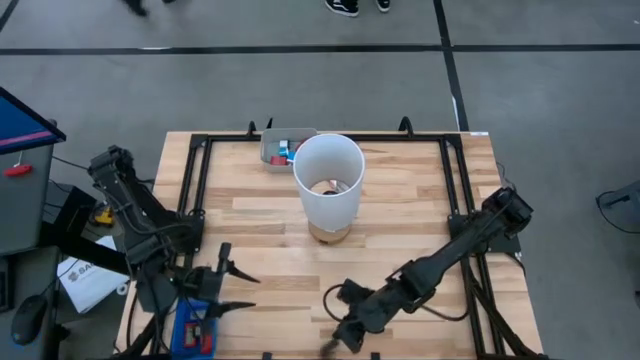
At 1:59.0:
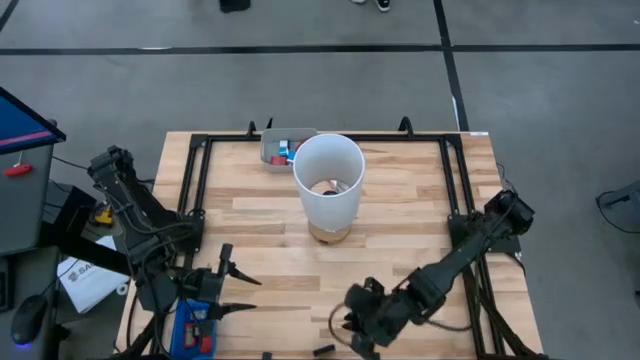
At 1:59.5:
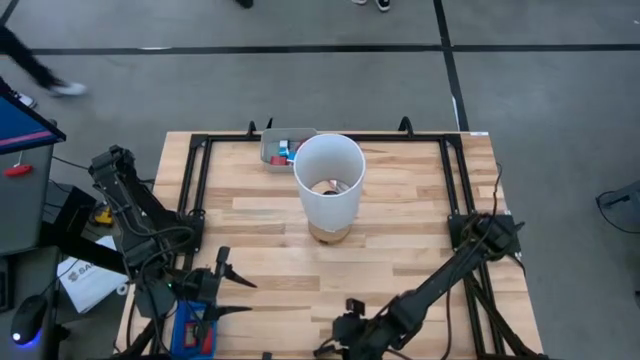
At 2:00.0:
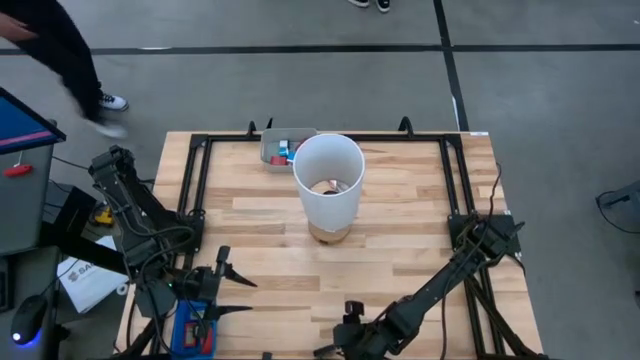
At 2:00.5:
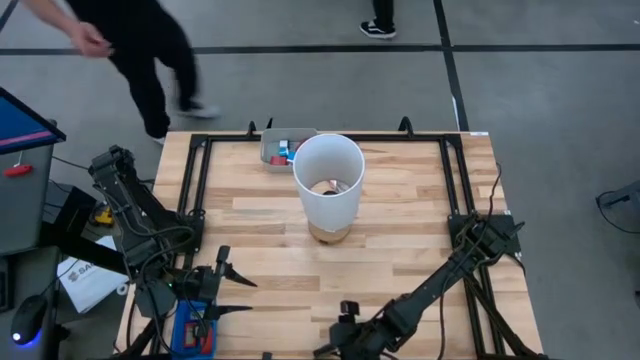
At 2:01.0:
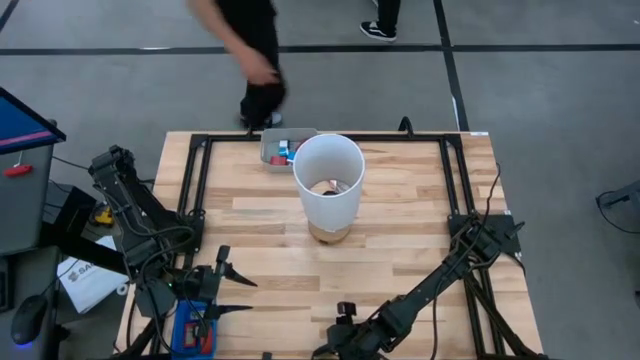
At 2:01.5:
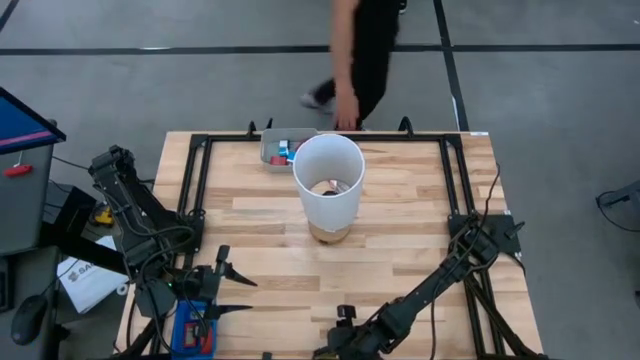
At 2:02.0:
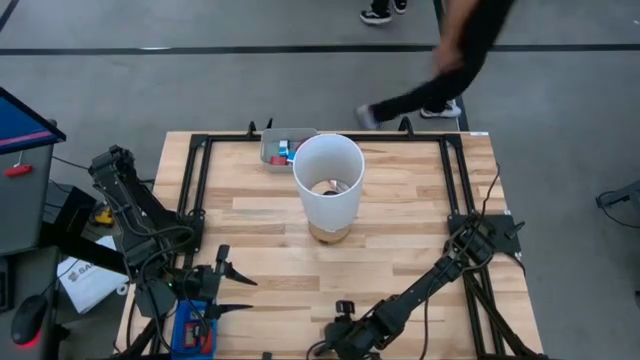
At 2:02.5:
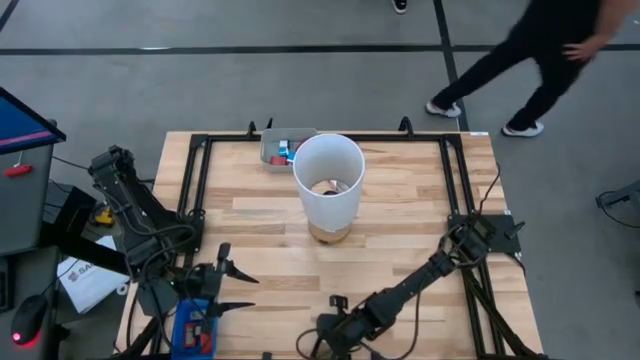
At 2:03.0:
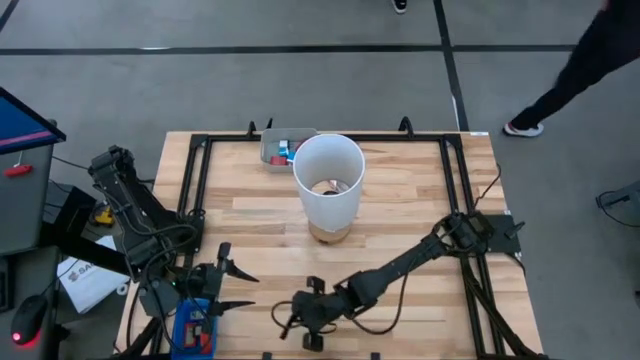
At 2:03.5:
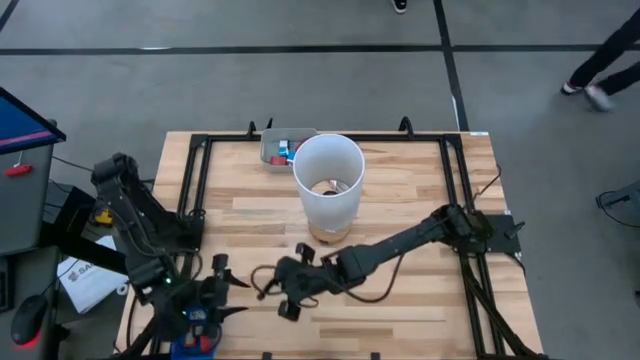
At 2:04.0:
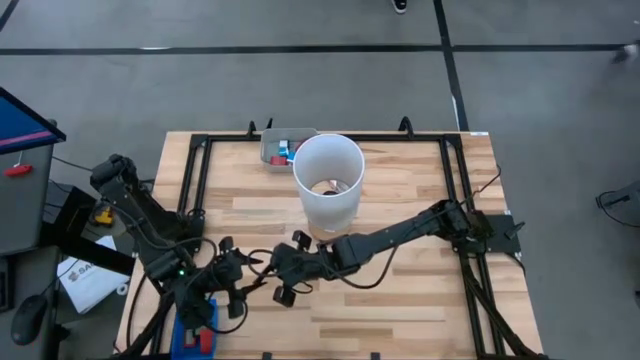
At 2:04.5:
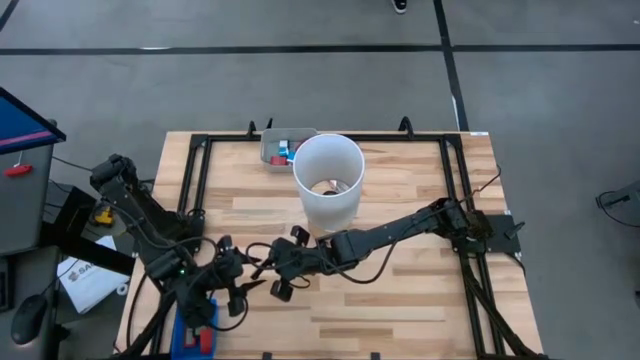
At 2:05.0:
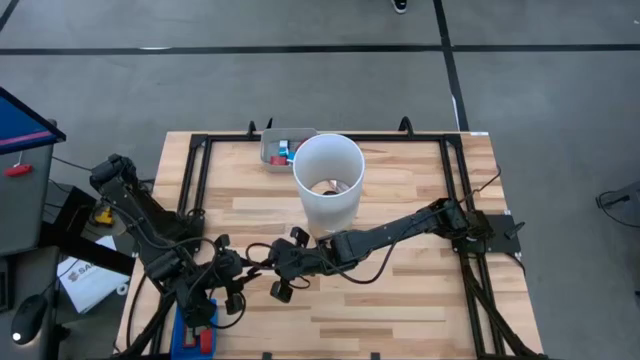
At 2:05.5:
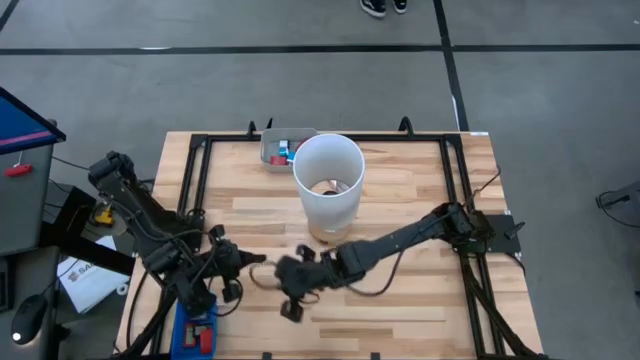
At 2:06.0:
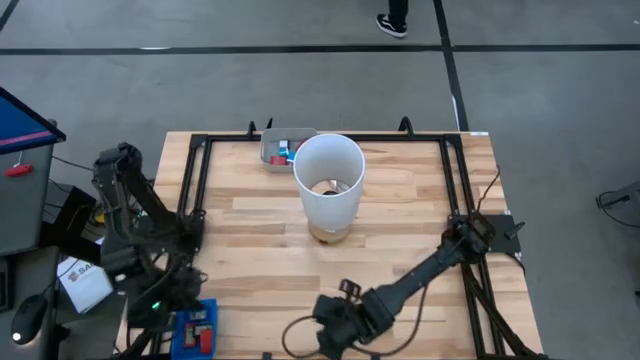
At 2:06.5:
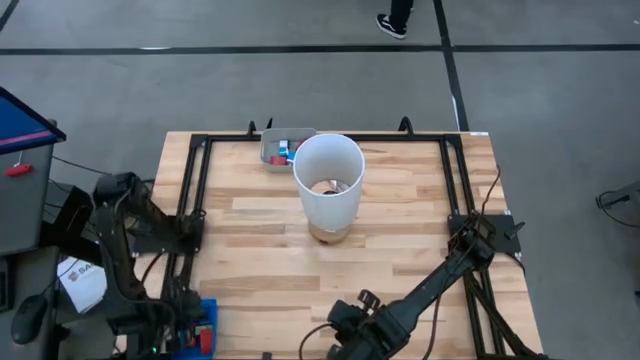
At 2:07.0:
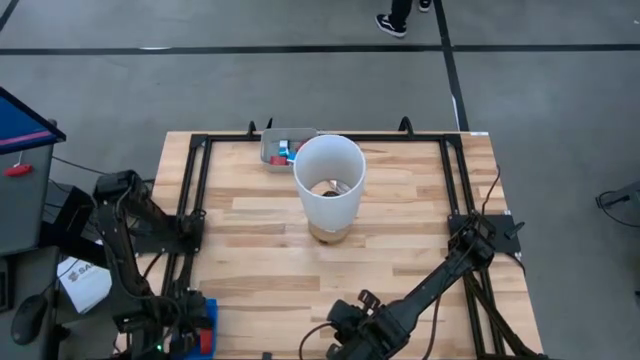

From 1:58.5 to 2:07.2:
Task: Pick & Place Office items
Put the black digital timer into the blue bin

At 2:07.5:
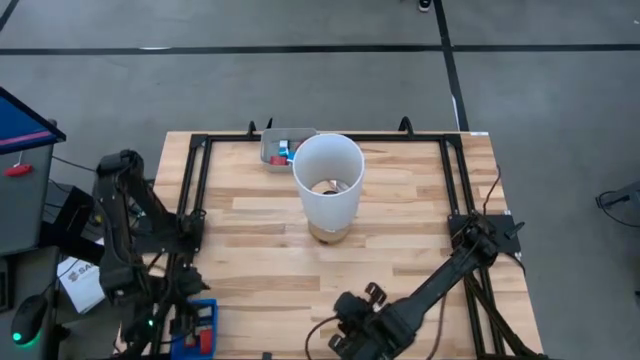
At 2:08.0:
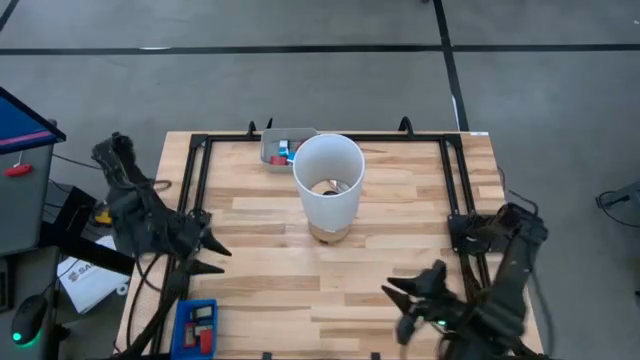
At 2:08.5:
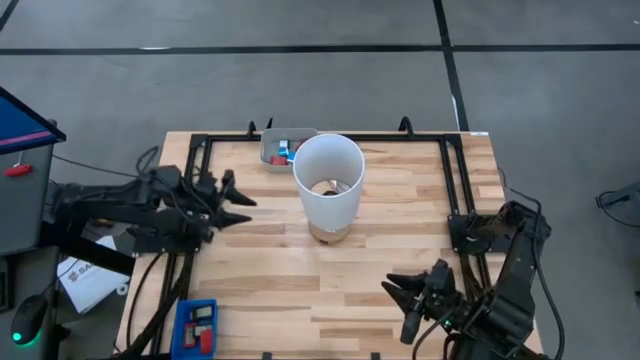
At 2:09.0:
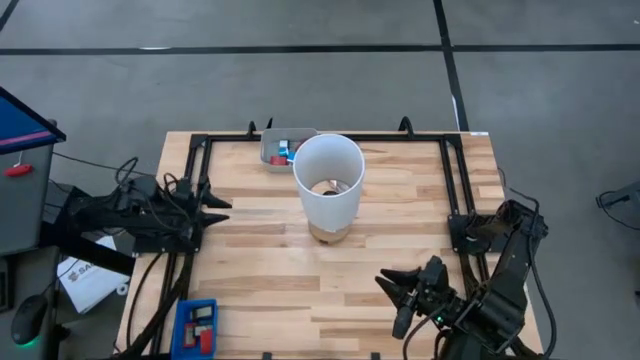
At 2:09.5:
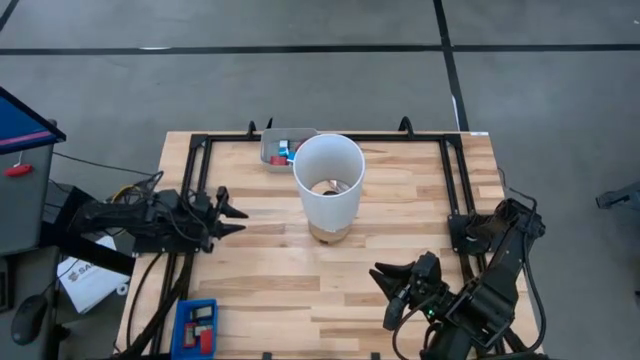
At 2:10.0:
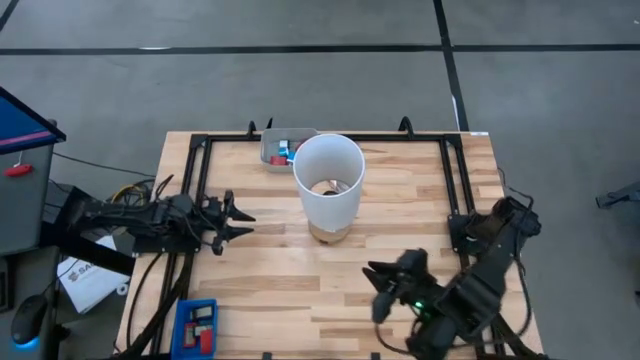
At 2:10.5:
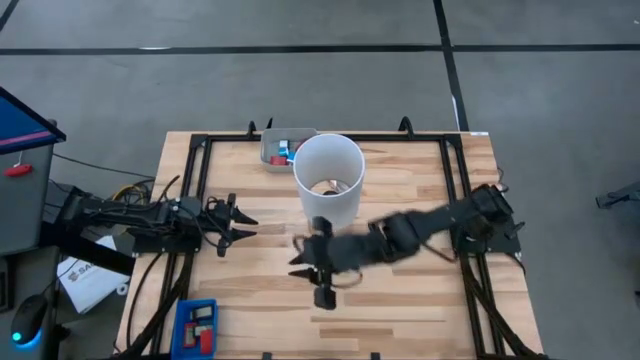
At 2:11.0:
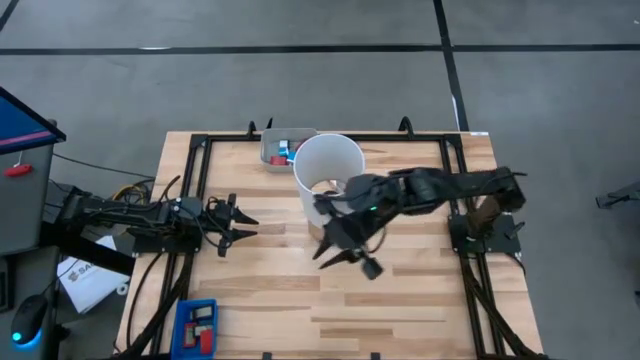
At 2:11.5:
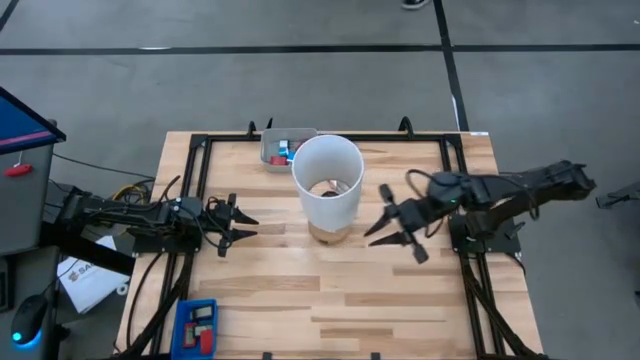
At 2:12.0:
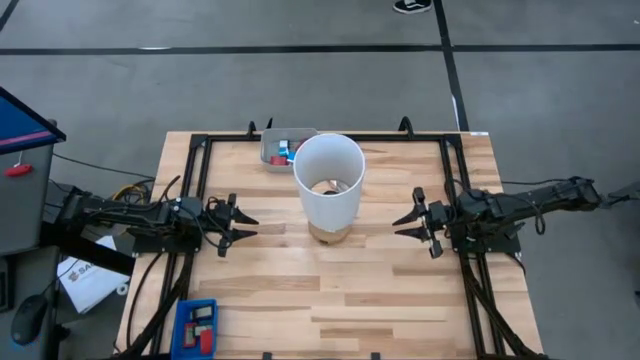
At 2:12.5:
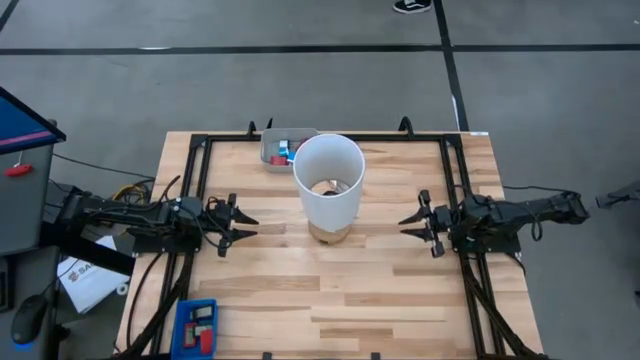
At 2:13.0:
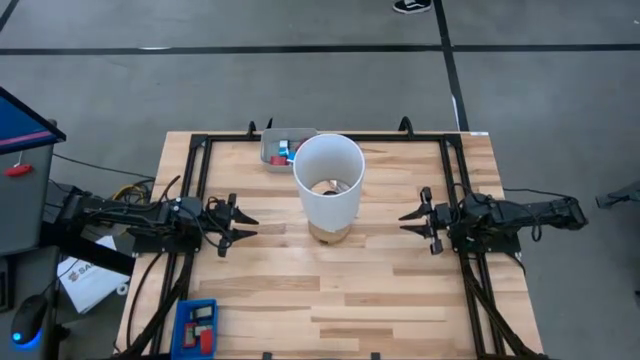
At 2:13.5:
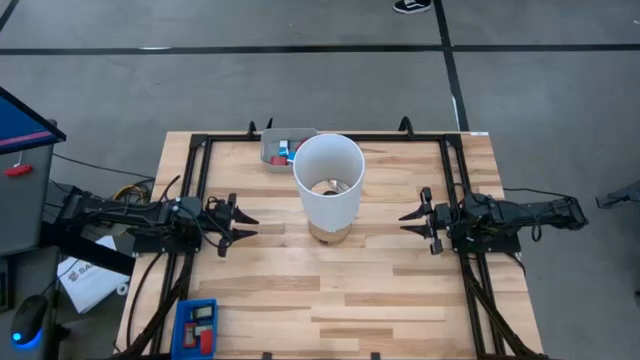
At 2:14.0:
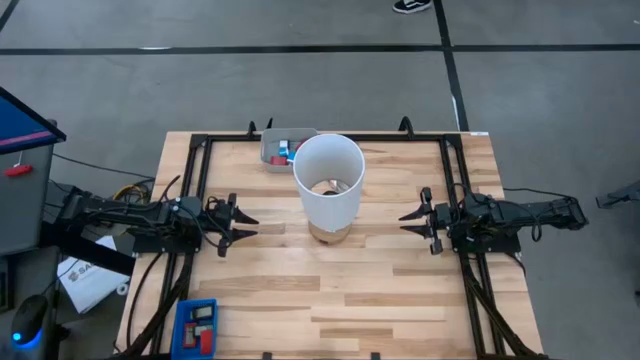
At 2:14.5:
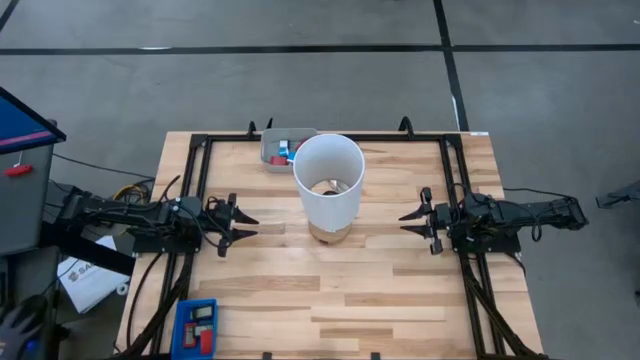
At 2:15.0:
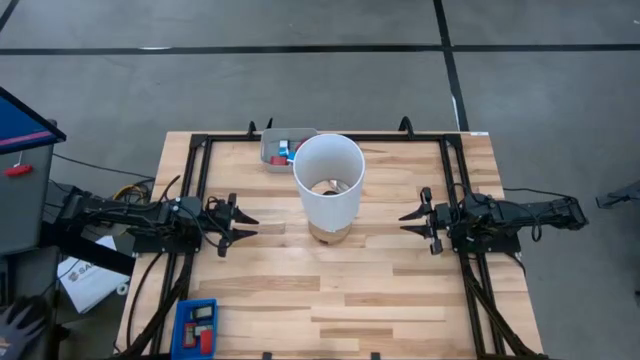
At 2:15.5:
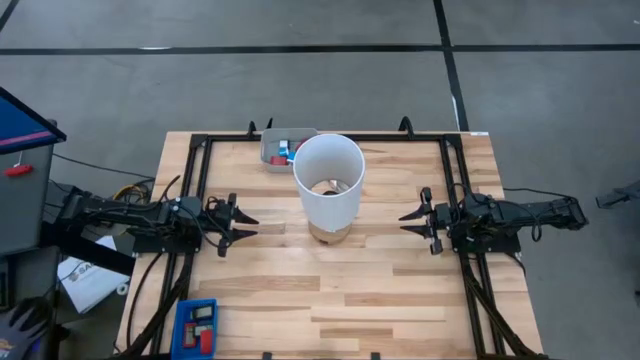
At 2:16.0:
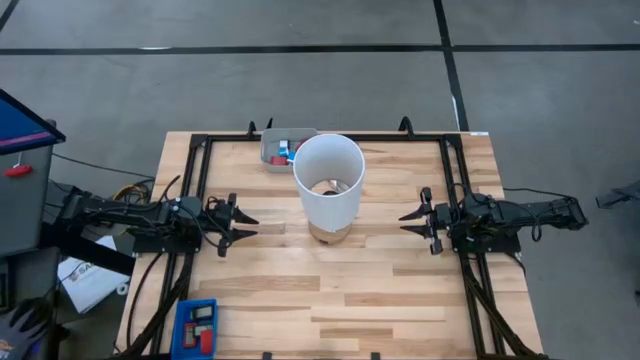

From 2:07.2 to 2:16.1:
Return to Home Position

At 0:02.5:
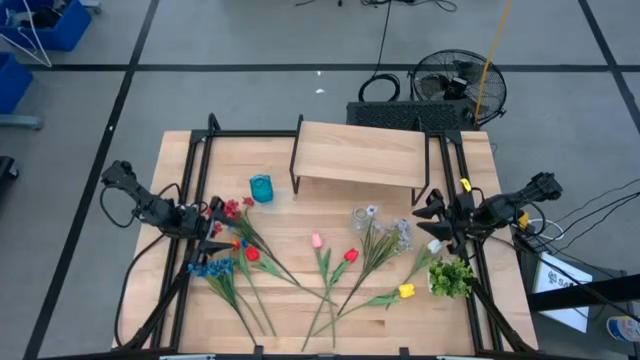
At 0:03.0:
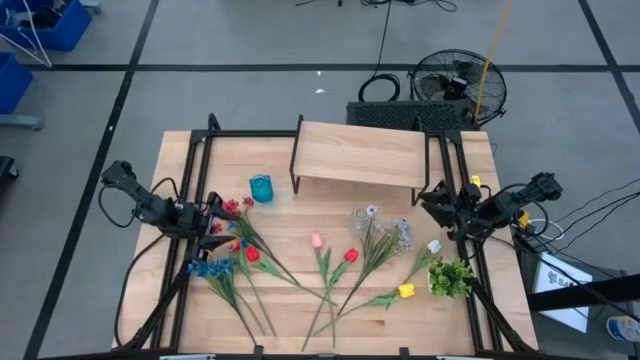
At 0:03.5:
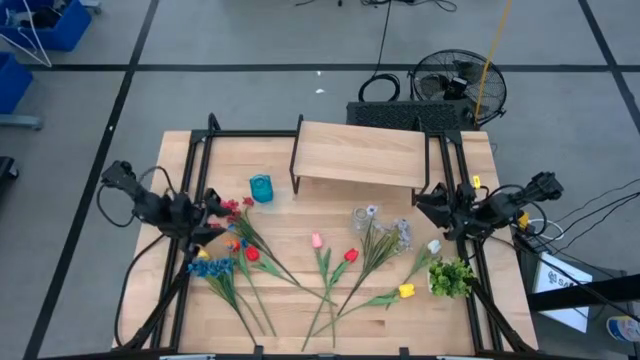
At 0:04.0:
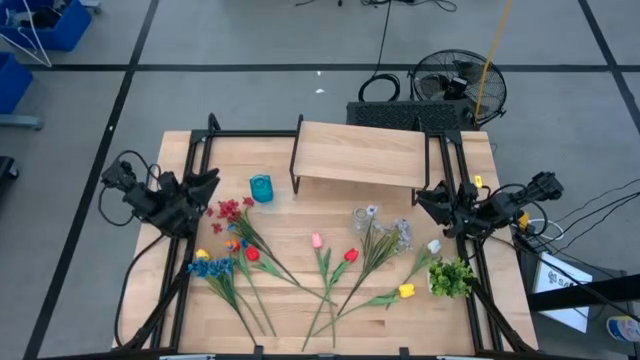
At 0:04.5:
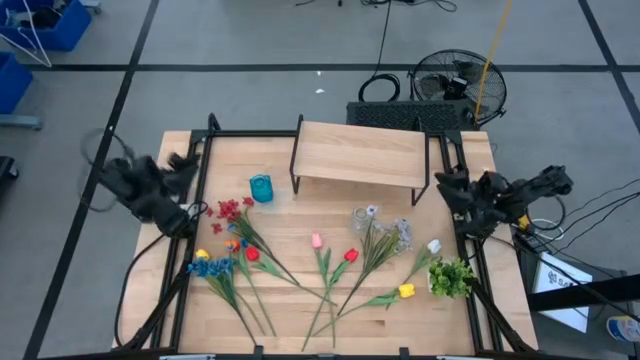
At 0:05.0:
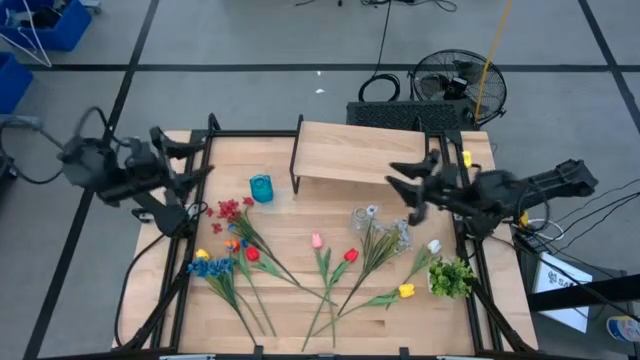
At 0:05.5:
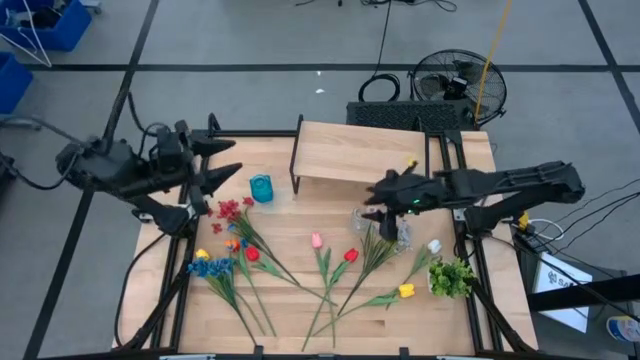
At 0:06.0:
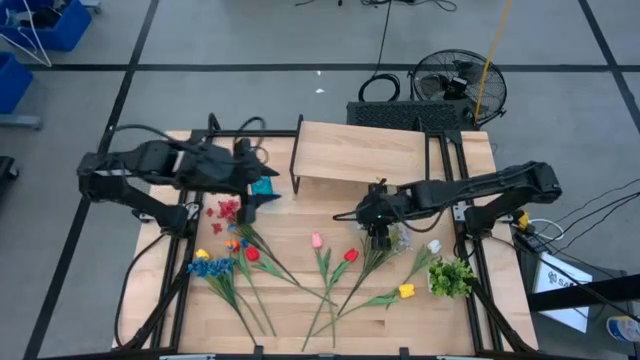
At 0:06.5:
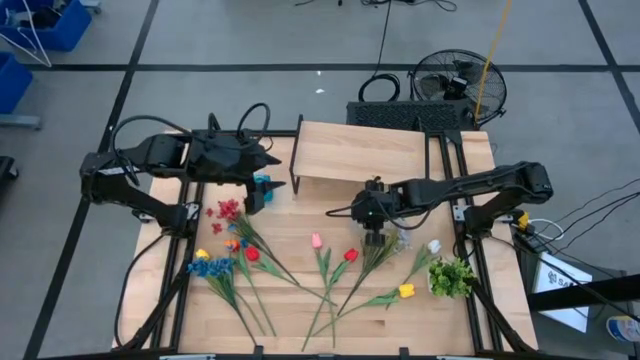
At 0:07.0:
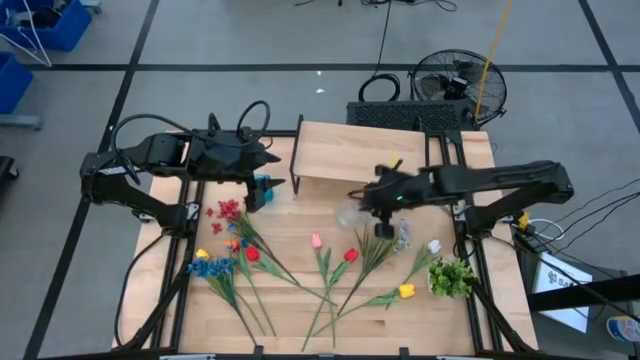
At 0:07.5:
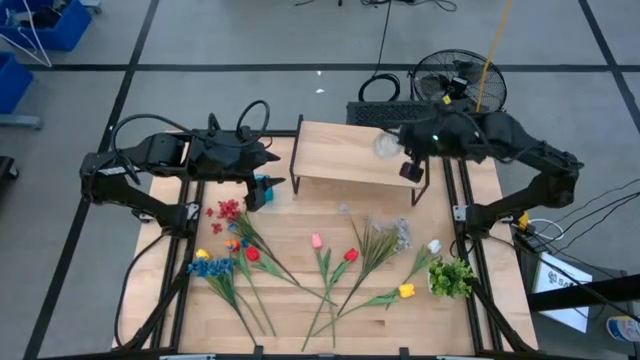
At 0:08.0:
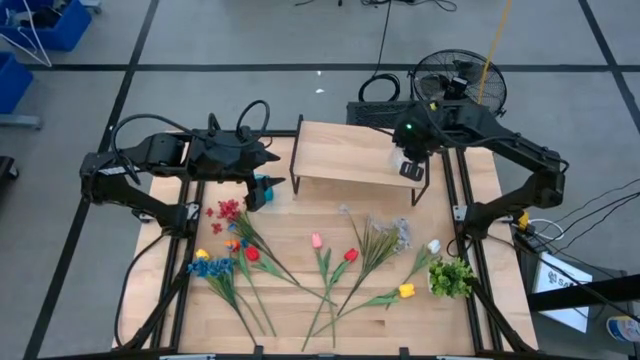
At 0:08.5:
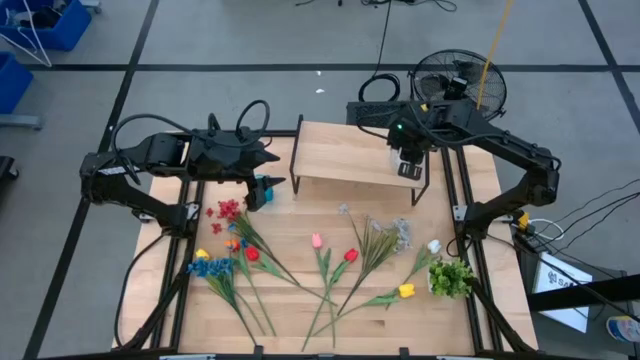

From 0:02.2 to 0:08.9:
Task: Pick and place flowers into a vace then onto a shelf
Put the transparent vase on the shelf
